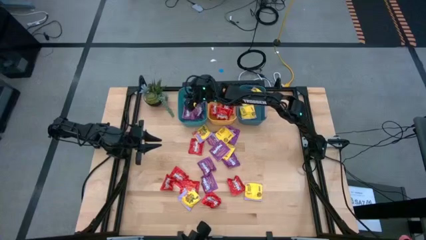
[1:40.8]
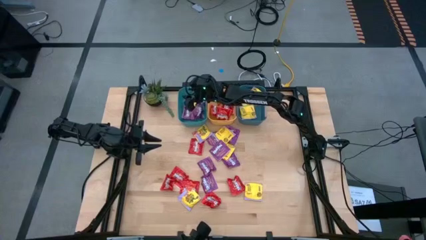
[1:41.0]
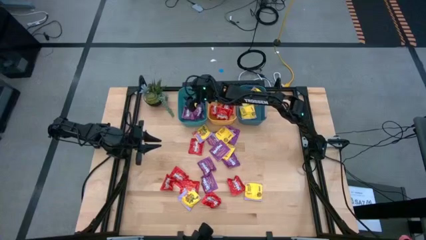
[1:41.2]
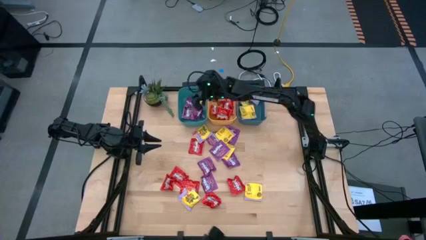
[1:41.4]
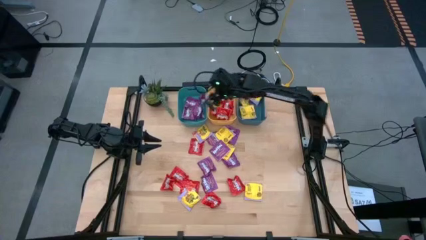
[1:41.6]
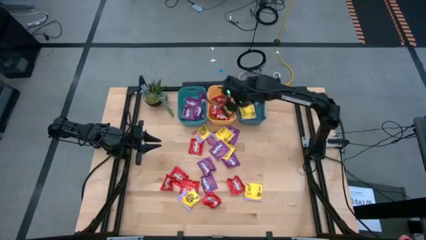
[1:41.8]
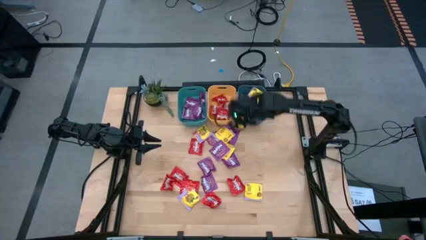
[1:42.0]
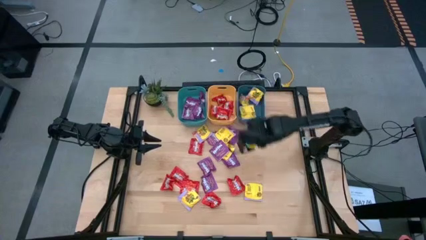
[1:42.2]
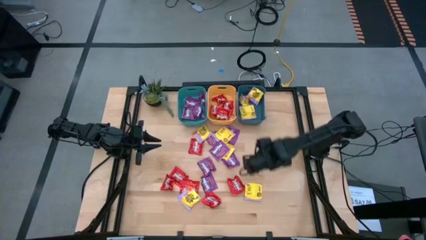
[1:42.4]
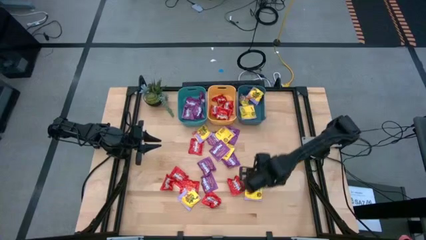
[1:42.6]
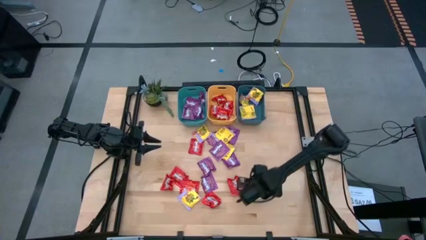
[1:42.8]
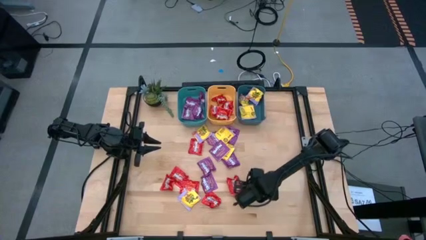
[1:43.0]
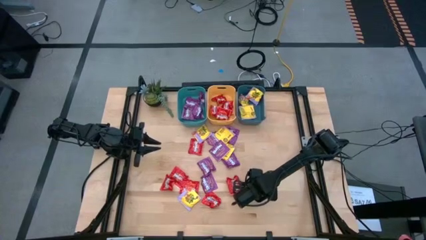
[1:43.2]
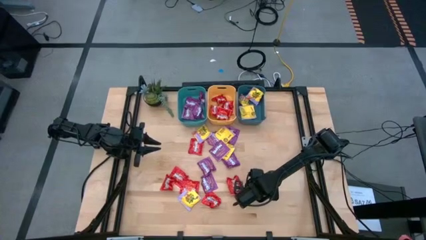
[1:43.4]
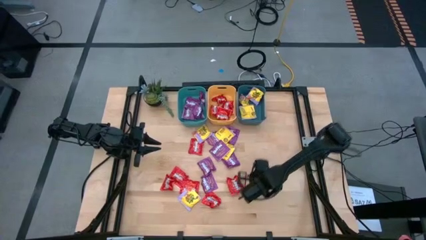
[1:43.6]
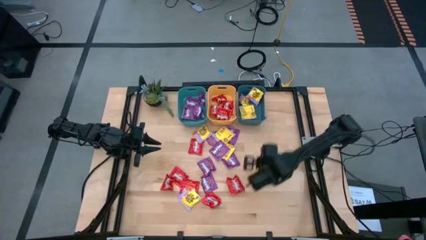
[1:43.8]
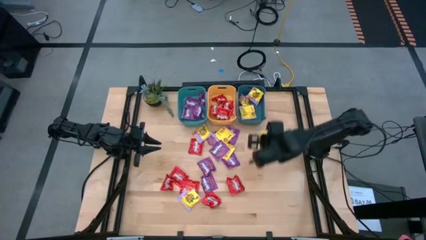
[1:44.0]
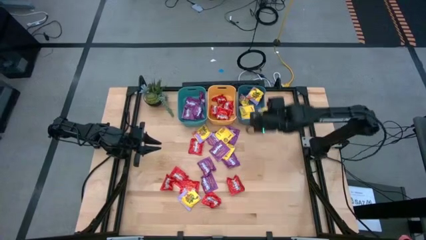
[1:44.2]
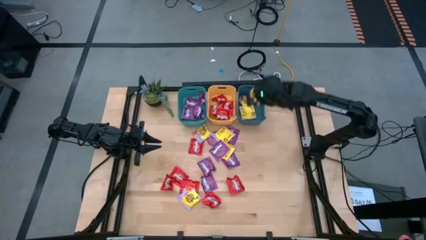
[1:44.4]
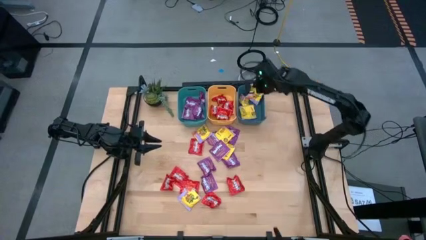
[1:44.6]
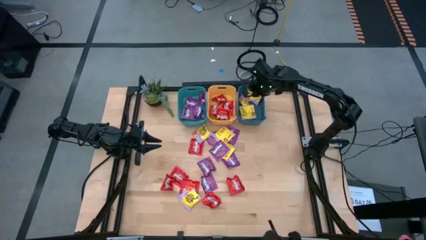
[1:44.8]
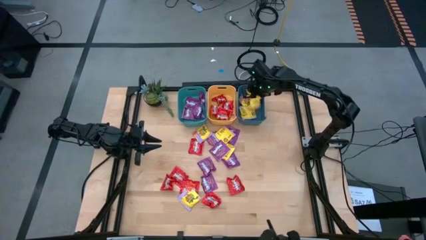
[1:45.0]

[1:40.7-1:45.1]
Task: Sort candy
Put the yellow candy into the dark blue bin

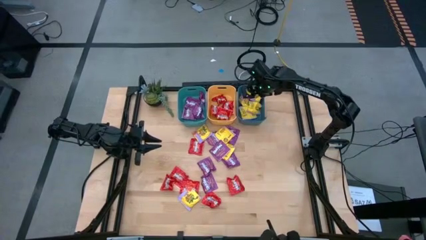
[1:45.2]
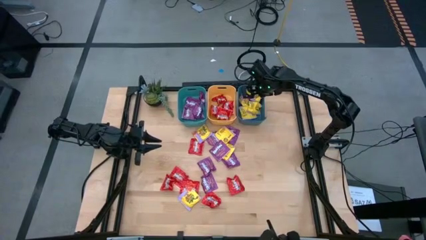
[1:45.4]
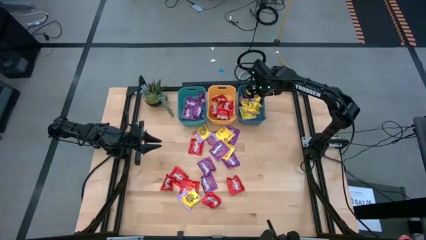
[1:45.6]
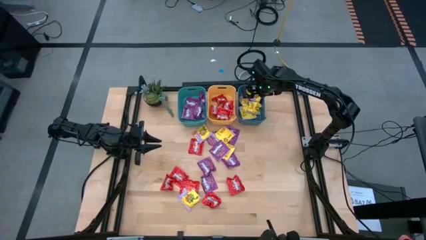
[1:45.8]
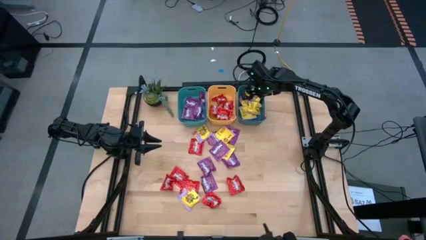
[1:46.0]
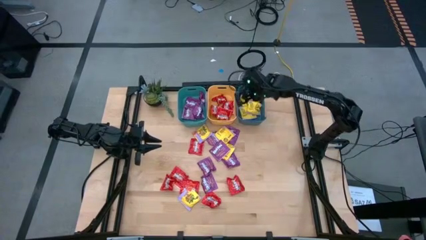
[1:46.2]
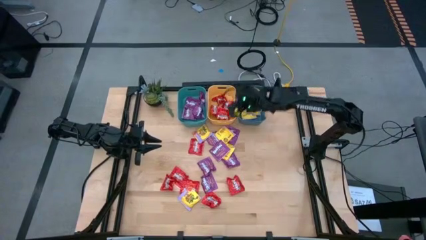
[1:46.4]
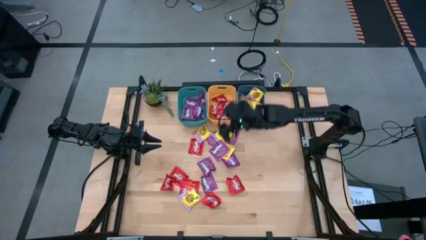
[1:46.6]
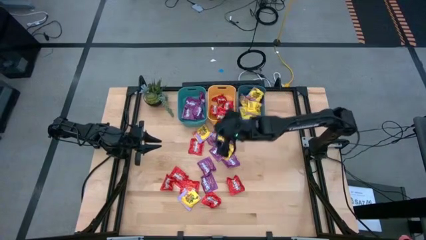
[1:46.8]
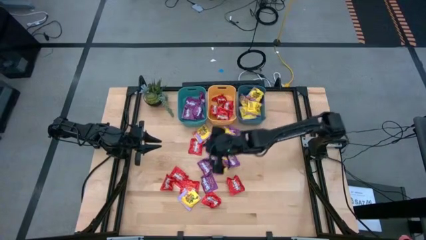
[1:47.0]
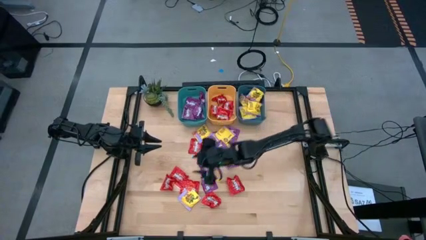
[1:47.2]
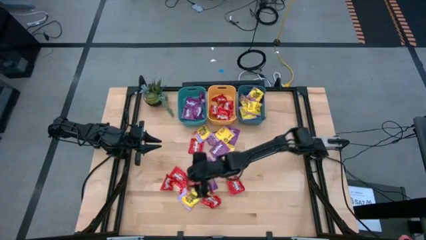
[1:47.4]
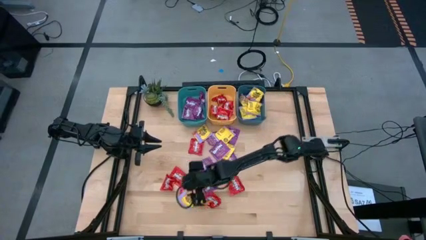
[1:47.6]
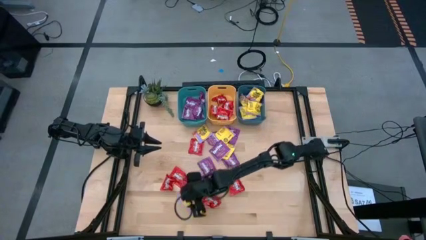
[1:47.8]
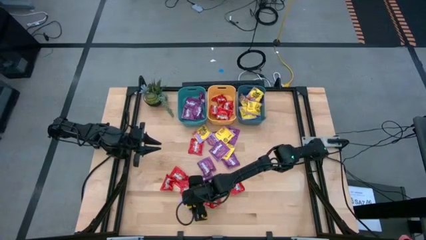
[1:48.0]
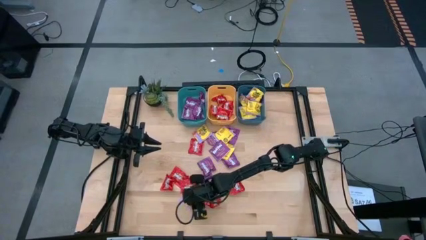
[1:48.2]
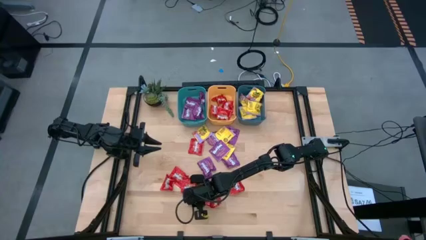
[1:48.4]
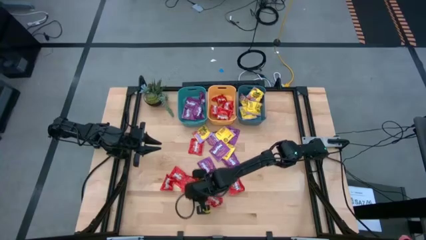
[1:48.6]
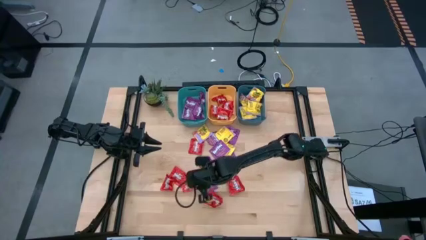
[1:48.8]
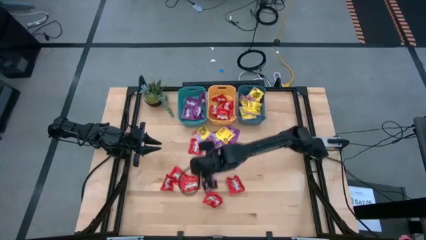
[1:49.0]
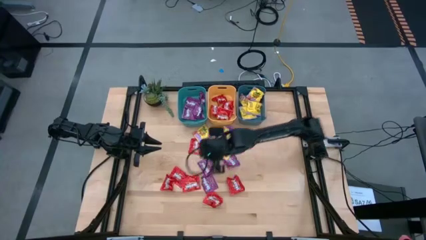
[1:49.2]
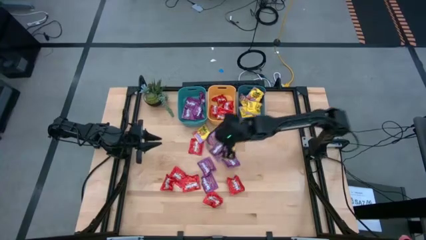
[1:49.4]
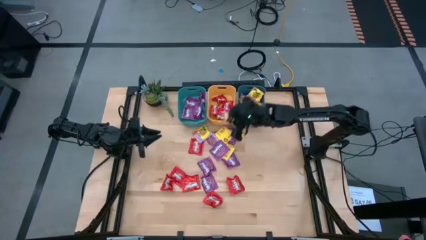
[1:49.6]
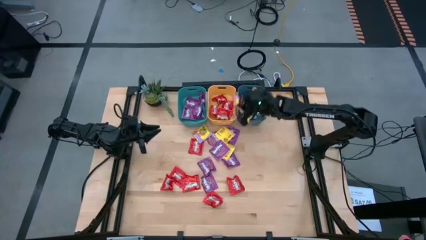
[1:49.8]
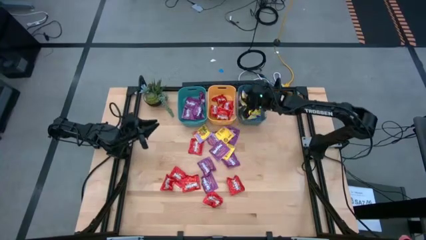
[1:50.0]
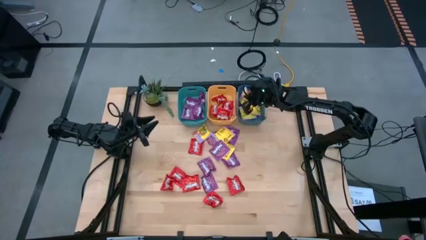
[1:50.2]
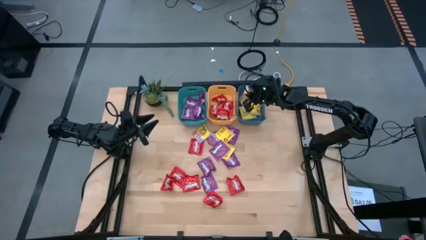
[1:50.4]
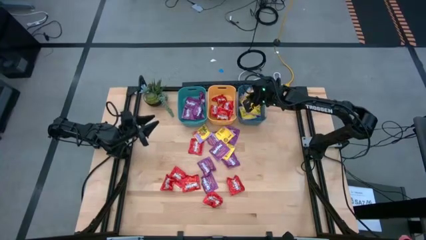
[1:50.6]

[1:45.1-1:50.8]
Put the yellow candy into the dark blue bin

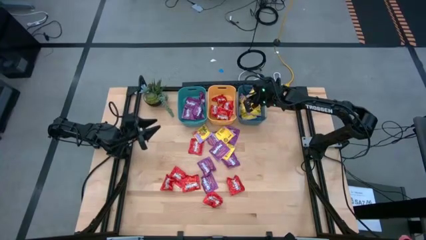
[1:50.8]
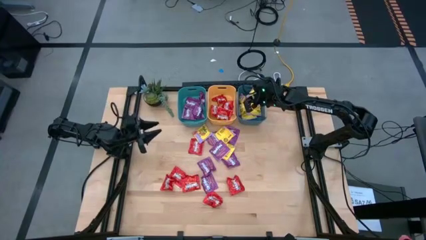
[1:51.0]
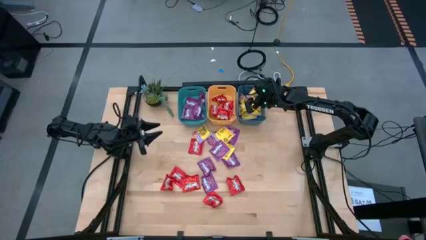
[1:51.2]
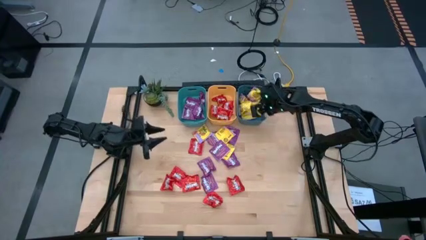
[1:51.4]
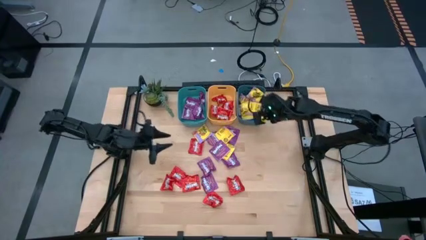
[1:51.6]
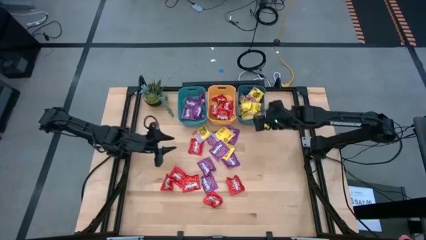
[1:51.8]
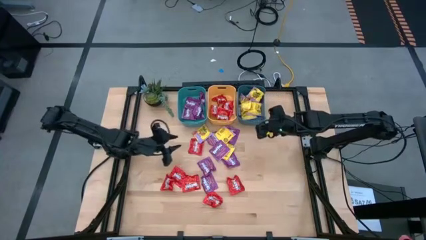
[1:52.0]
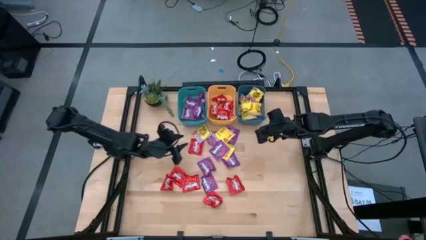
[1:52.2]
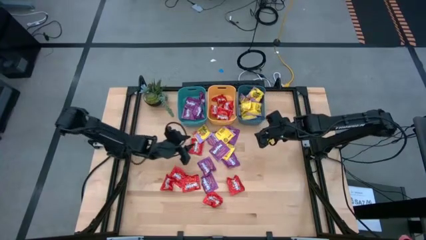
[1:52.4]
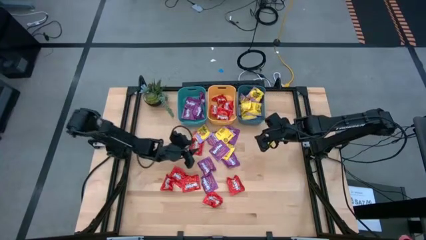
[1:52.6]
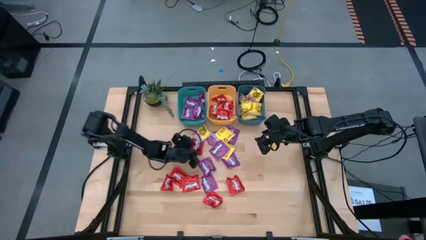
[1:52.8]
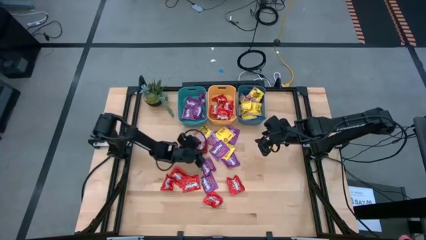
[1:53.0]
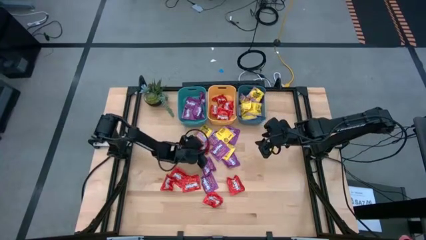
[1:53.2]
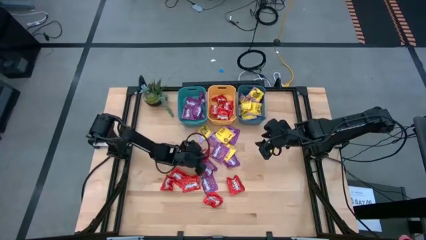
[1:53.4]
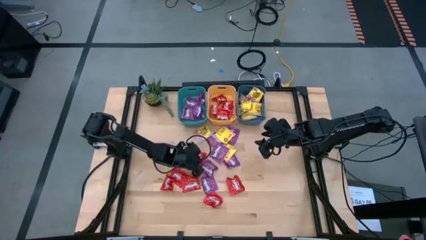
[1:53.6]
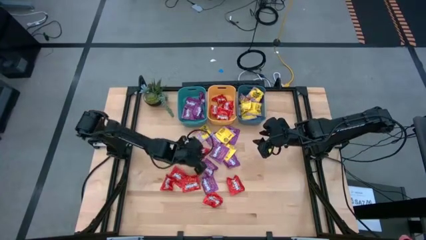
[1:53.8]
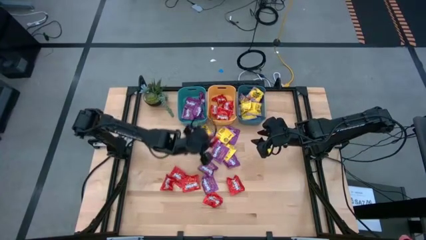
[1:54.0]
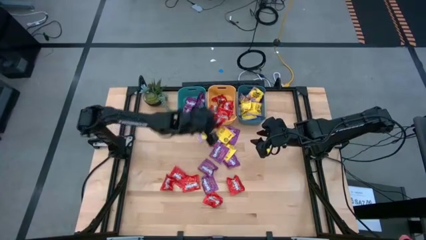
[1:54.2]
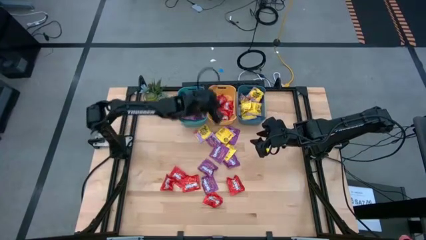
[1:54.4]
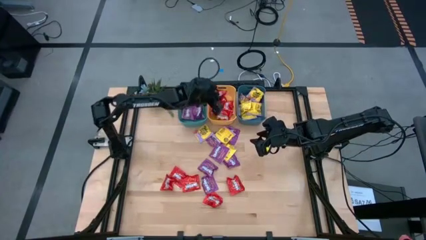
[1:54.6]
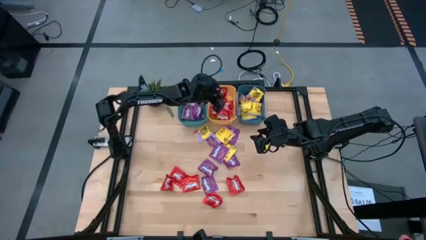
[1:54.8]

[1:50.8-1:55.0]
Put the red candy into the yellow bin

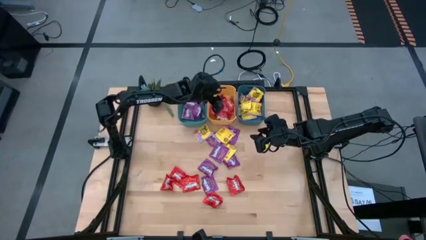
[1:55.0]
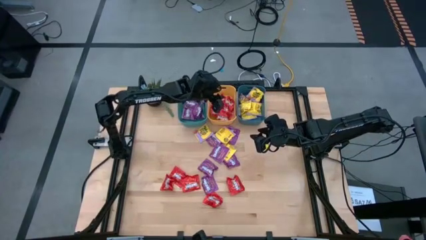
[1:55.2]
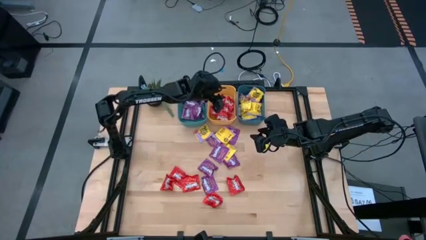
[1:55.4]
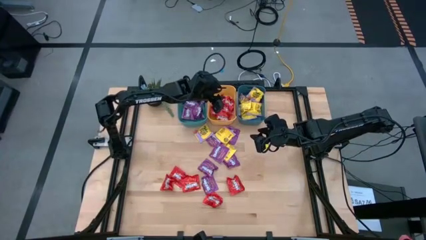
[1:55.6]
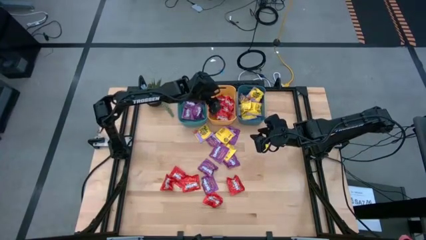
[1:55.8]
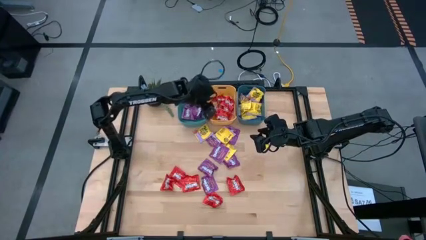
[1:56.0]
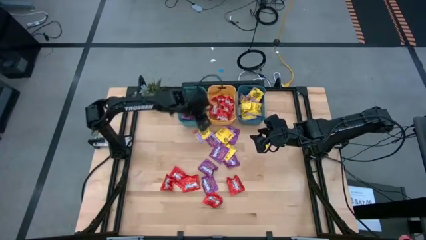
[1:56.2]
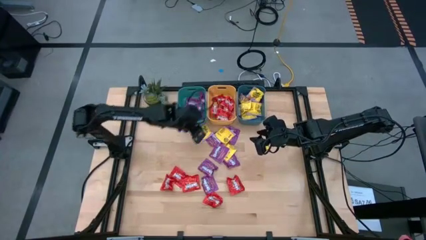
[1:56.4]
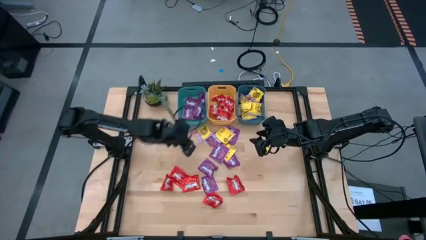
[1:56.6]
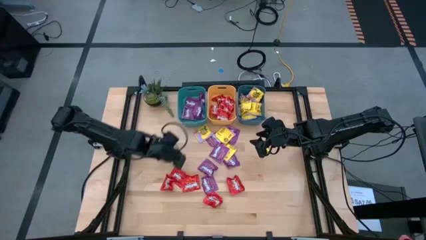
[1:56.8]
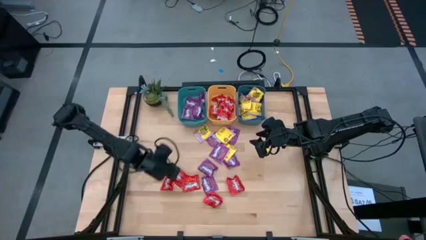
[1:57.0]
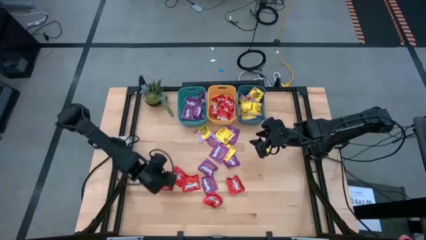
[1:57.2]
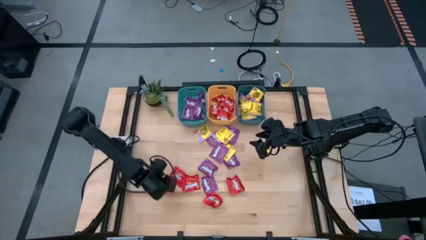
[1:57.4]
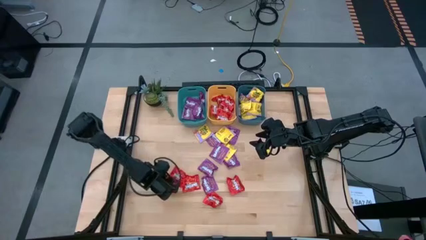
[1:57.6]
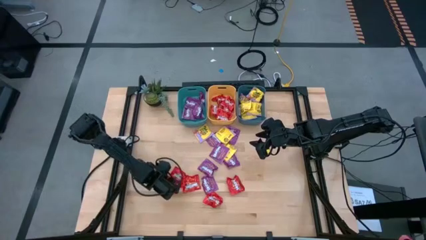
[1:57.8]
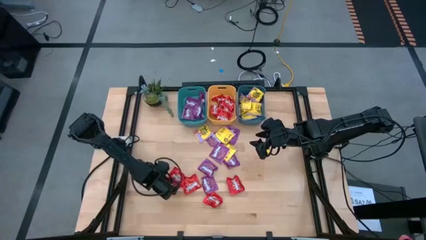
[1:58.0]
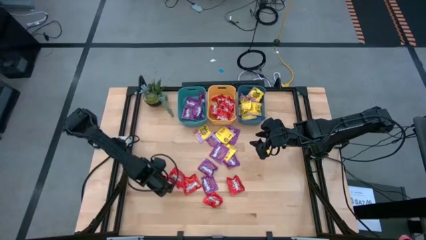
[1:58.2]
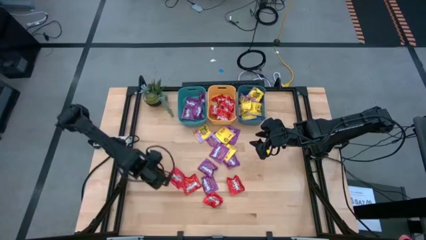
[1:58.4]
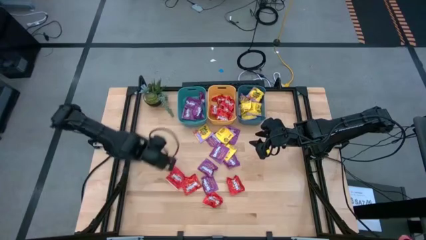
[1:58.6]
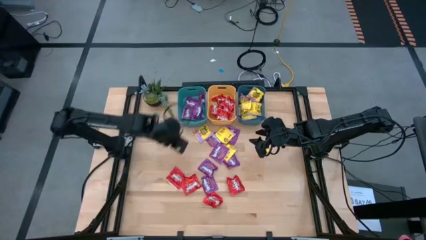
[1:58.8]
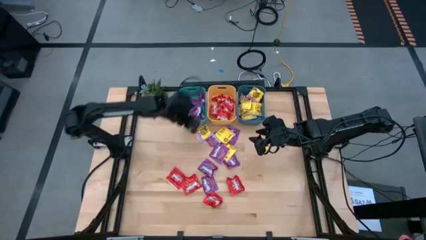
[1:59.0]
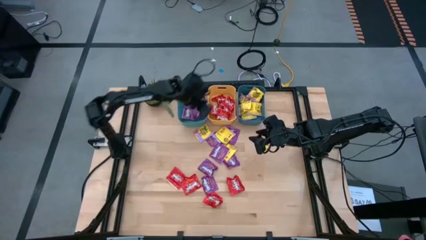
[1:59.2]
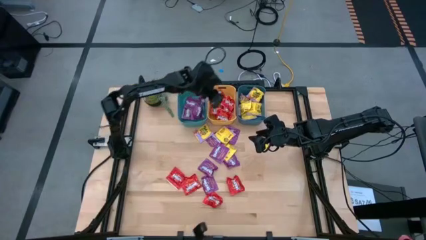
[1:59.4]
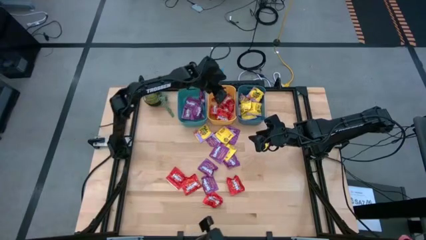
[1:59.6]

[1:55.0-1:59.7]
Put the red candy into the yellow bin
